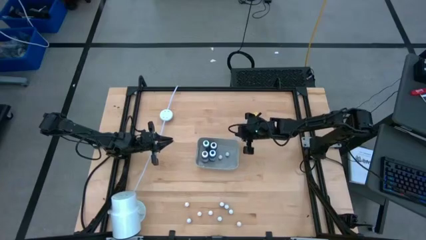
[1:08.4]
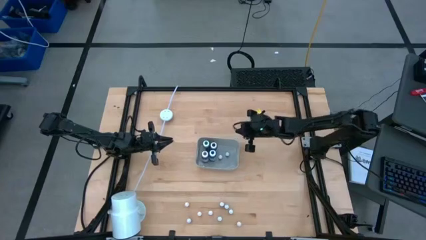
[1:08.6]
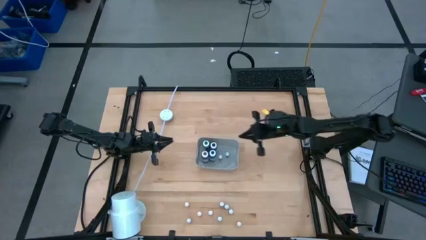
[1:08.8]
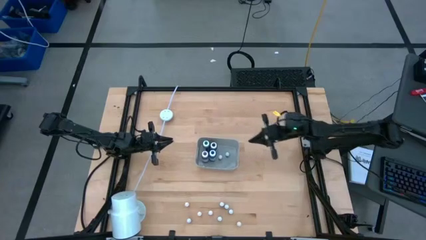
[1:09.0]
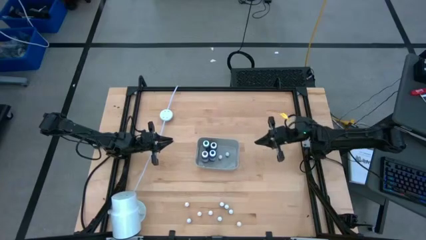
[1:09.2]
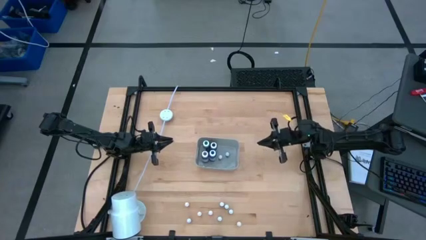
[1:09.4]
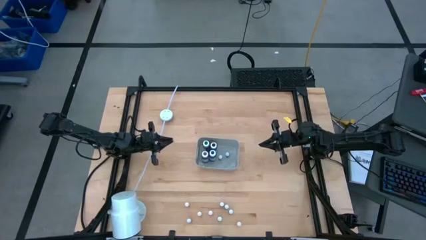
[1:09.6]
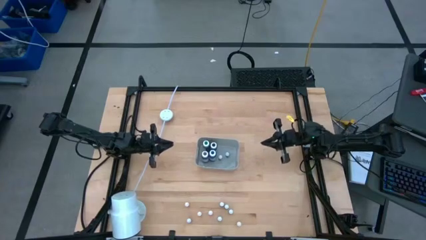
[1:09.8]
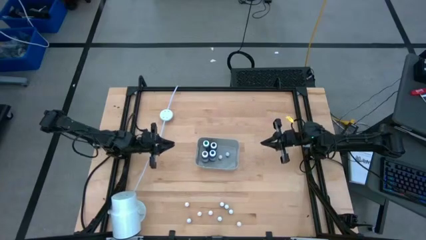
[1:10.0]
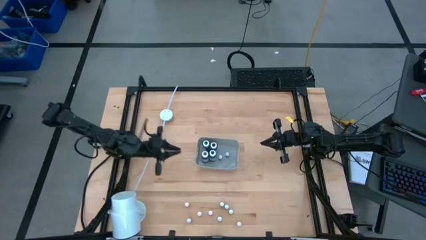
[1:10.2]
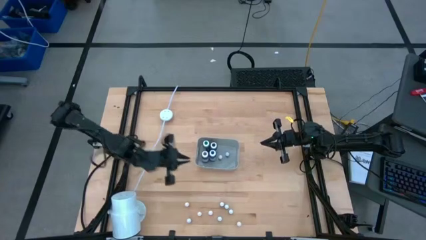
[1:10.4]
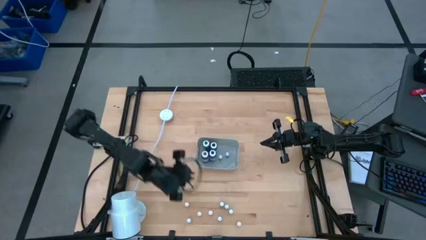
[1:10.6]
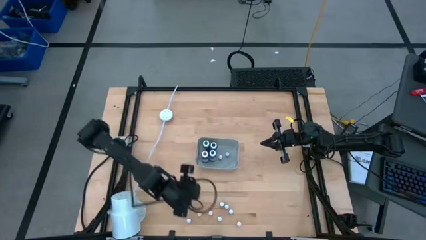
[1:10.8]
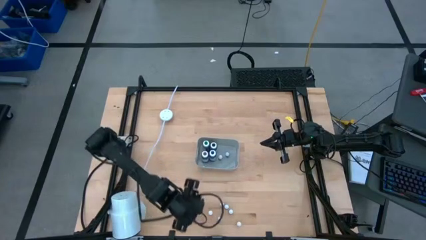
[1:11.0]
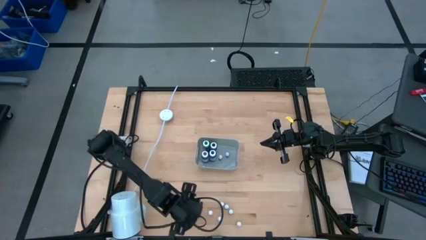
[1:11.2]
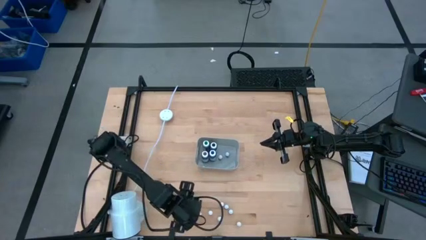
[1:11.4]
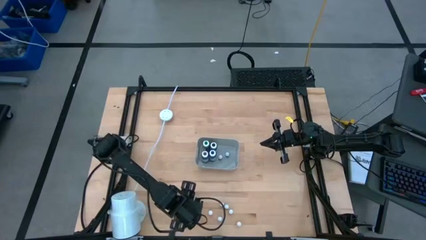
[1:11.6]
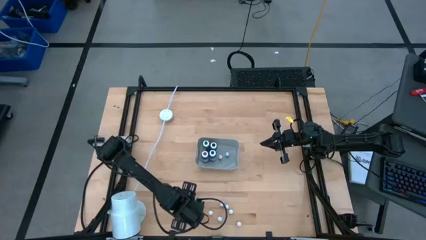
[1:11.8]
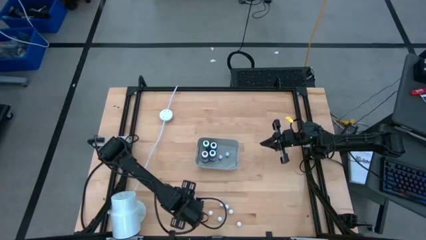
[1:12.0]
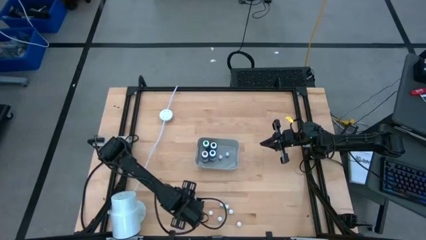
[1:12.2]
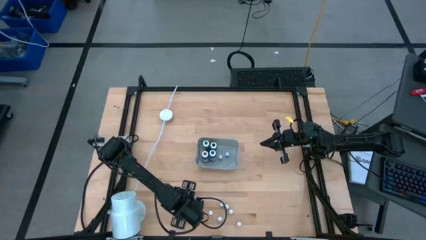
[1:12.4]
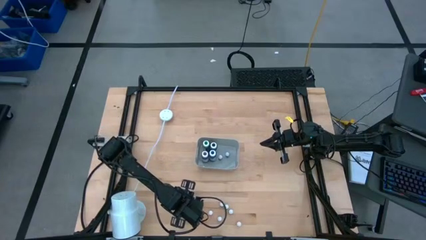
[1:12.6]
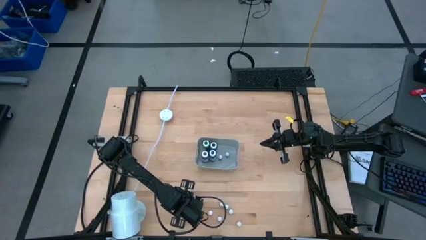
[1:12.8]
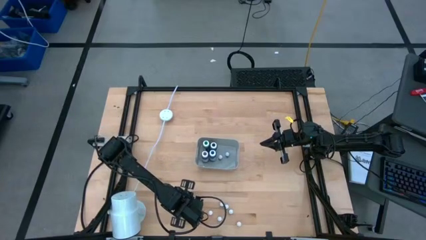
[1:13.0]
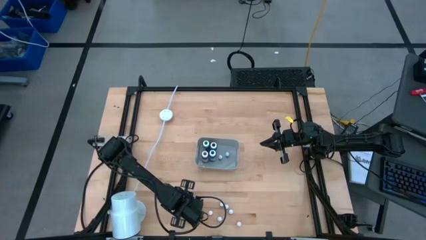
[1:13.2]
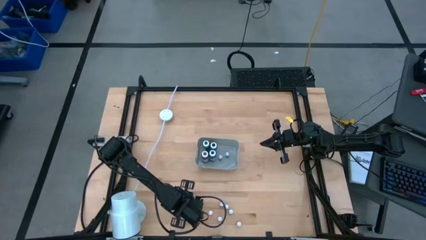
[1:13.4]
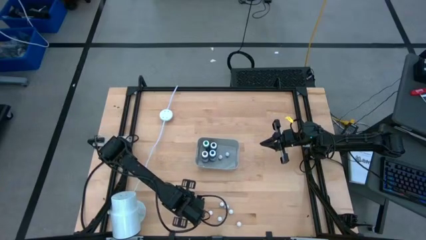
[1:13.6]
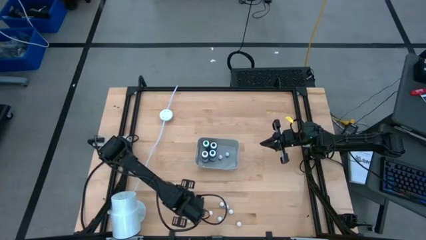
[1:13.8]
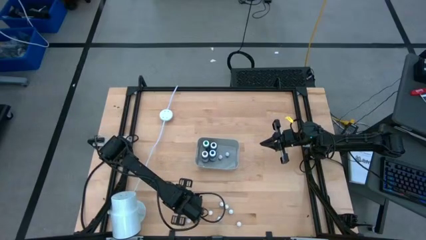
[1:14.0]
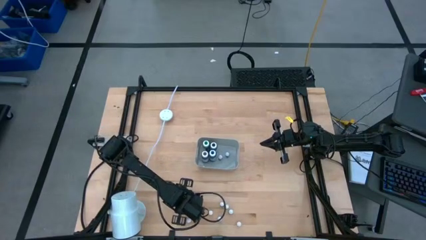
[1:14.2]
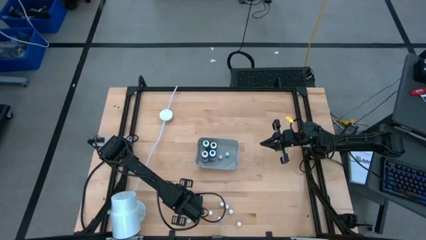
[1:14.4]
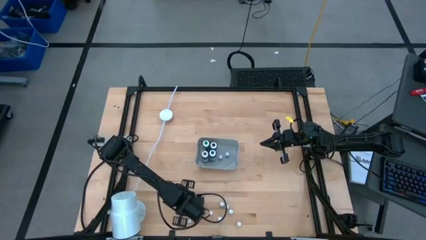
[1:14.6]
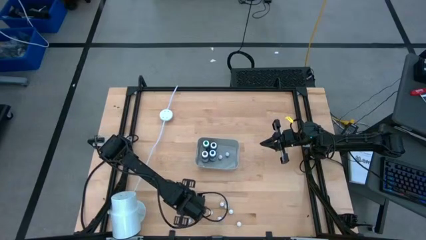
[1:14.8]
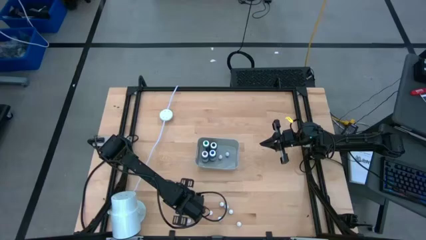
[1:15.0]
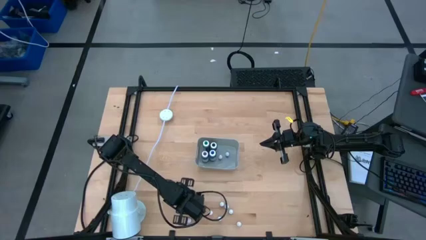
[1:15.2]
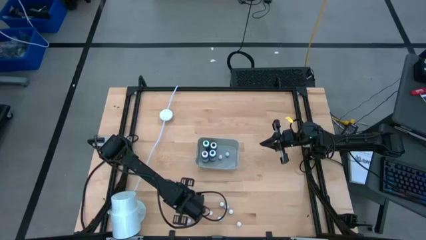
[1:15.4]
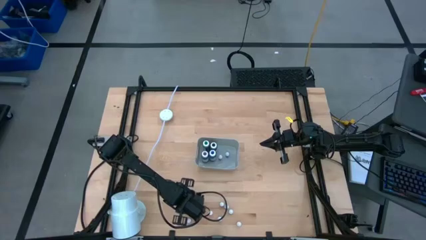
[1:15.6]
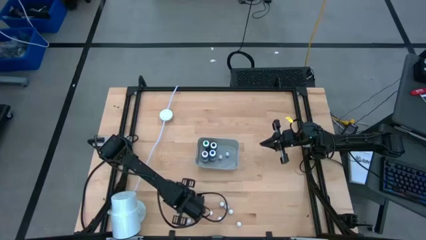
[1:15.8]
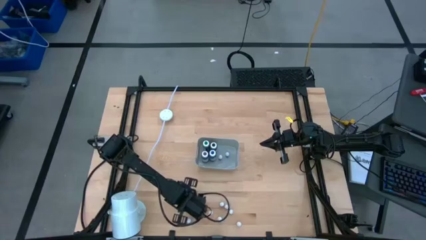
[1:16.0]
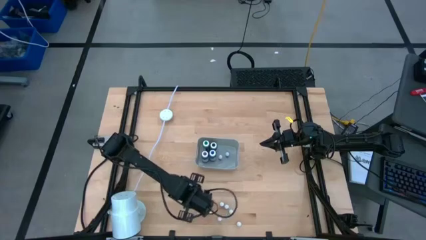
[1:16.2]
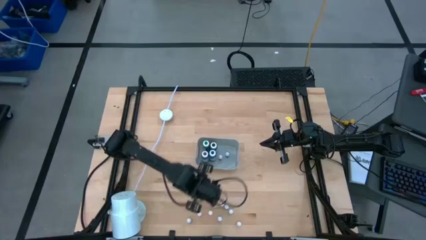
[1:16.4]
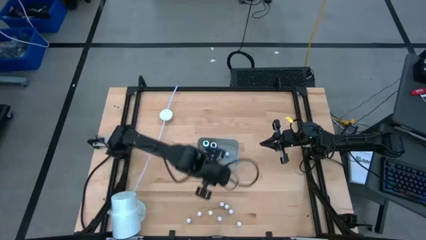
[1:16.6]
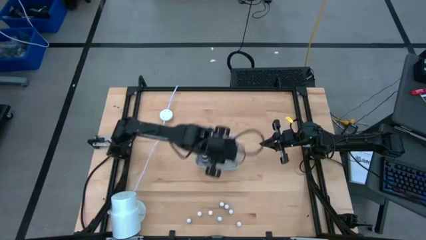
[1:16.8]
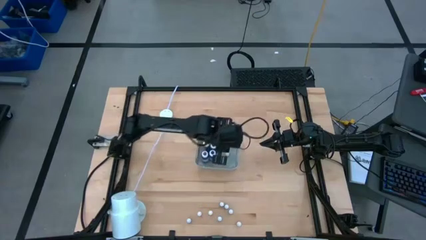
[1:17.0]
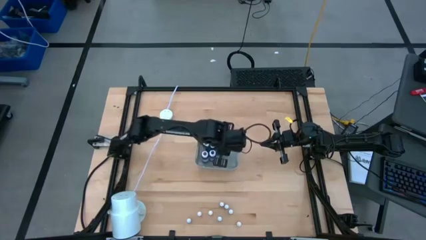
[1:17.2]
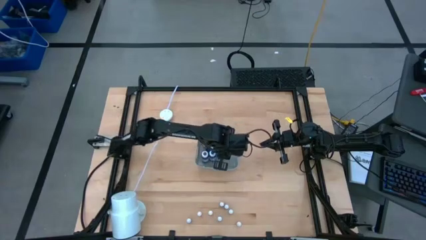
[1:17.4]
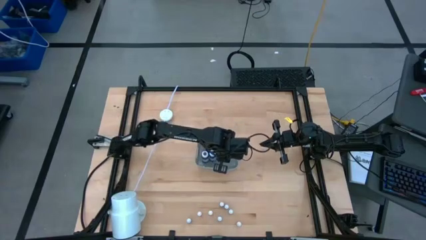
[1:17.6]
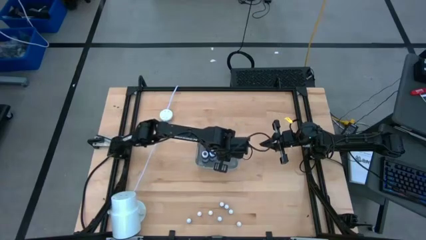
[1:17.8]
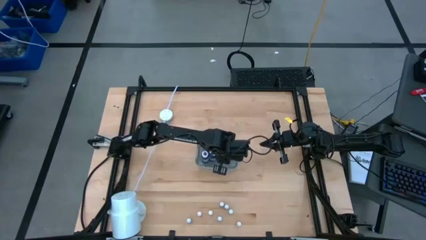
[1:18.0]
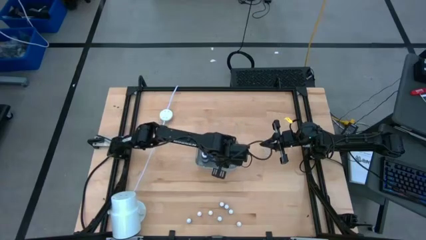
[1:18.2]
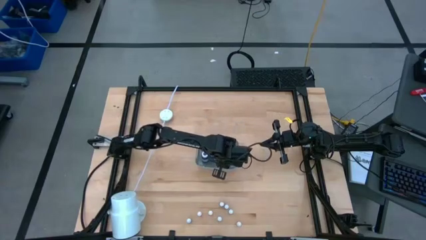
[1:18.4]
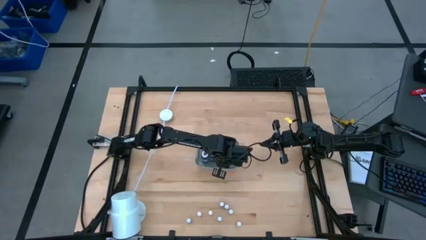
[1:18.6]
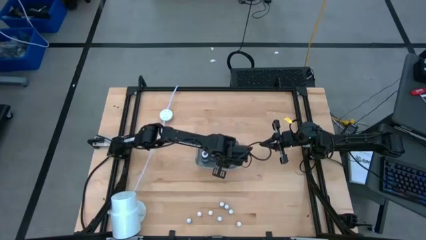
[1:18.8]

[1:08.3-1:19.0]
Task: Pick & Place food coloring
Put the small orange food coloring bottle into the gray container

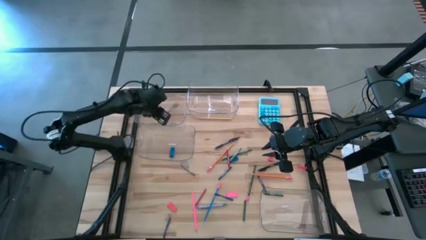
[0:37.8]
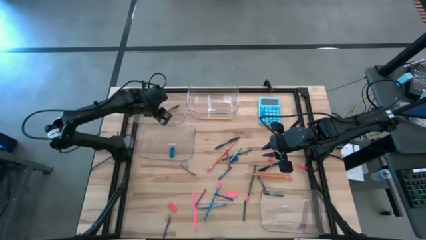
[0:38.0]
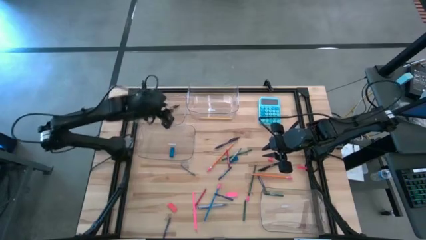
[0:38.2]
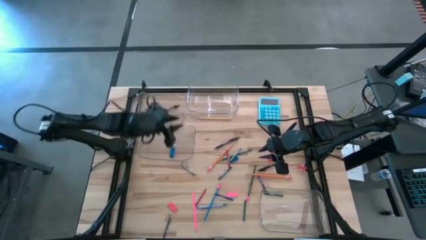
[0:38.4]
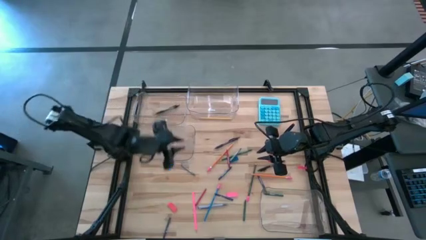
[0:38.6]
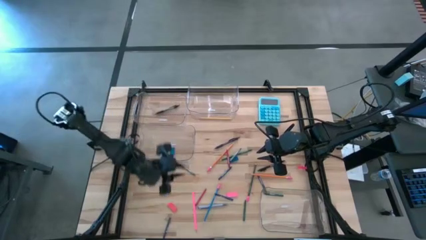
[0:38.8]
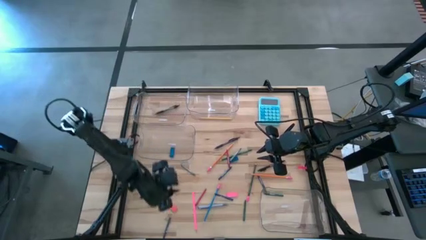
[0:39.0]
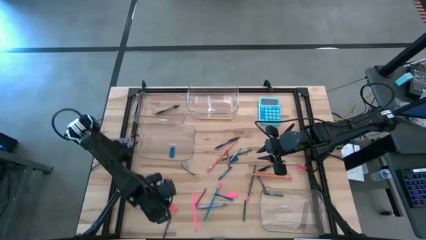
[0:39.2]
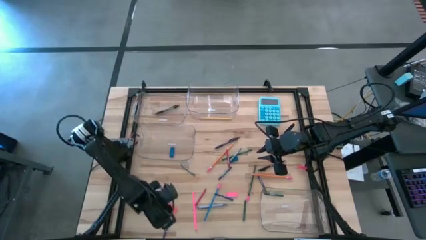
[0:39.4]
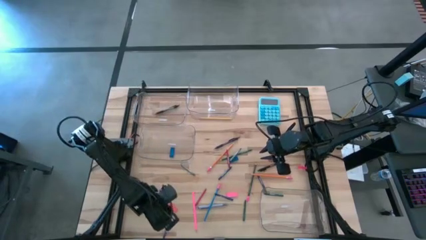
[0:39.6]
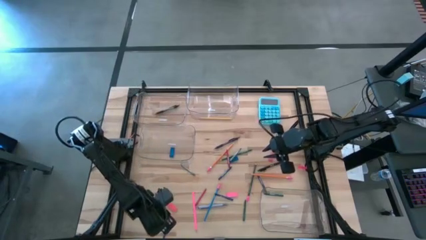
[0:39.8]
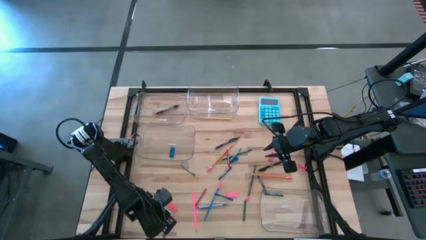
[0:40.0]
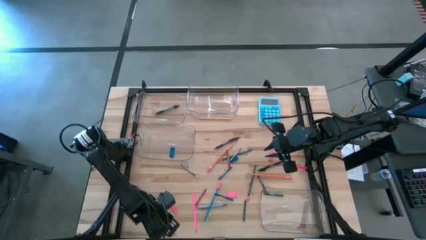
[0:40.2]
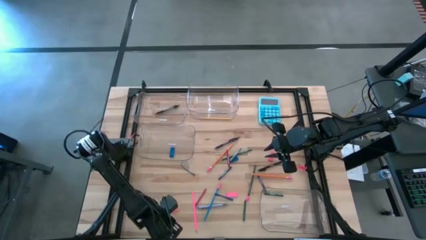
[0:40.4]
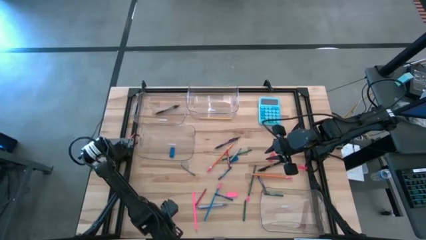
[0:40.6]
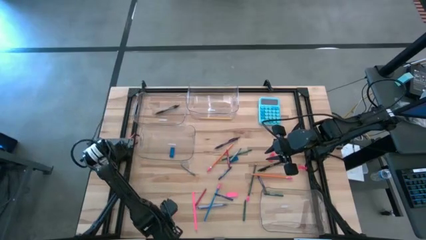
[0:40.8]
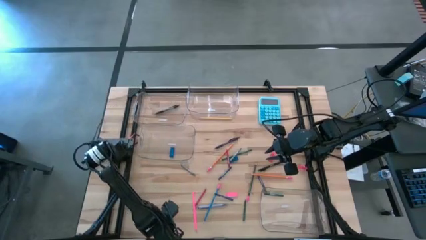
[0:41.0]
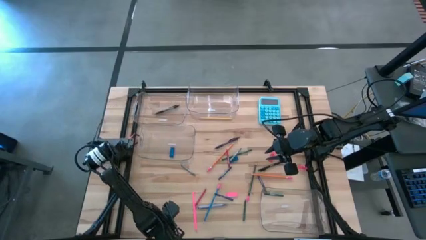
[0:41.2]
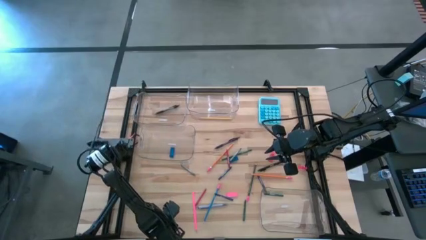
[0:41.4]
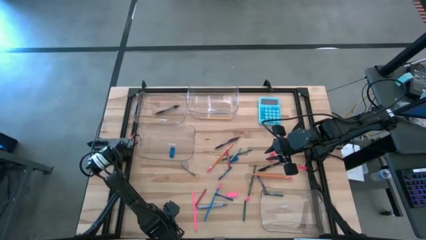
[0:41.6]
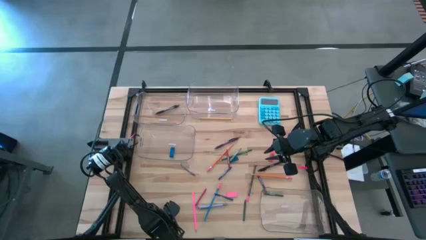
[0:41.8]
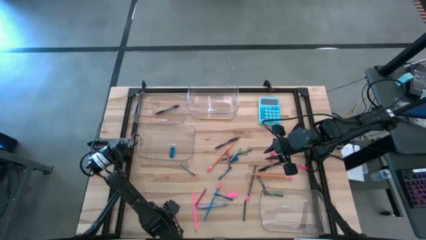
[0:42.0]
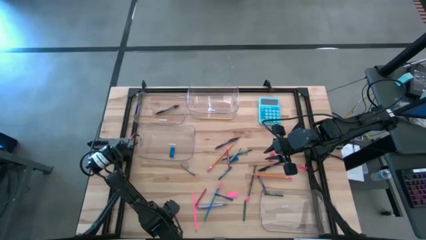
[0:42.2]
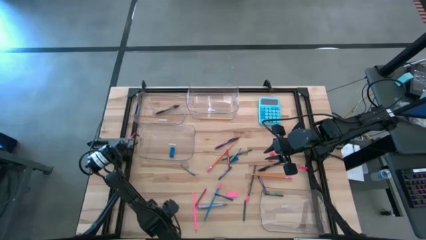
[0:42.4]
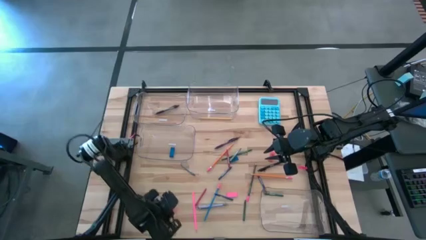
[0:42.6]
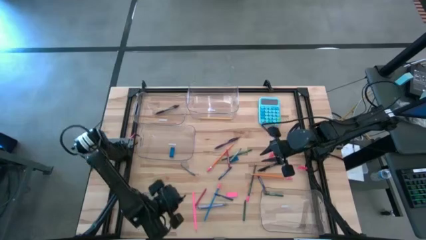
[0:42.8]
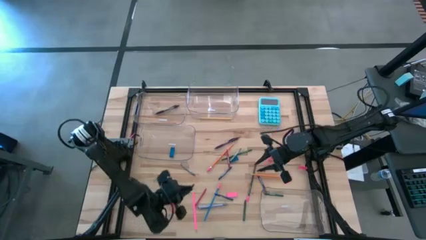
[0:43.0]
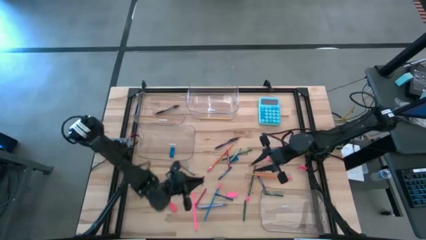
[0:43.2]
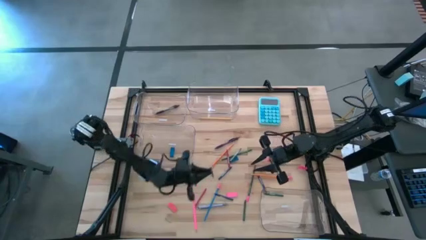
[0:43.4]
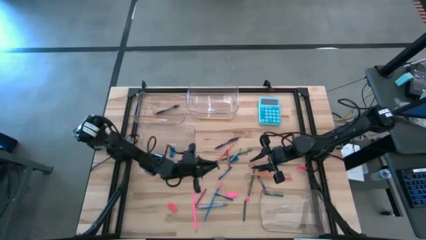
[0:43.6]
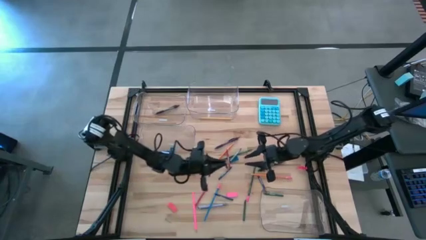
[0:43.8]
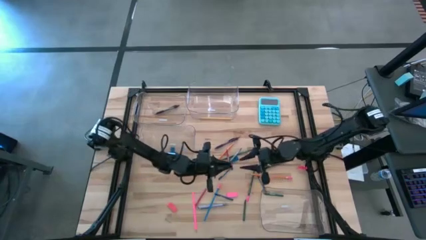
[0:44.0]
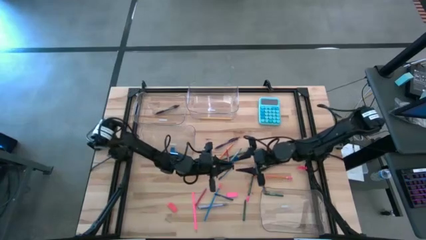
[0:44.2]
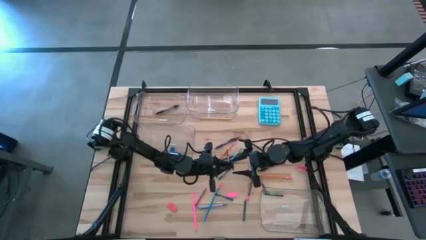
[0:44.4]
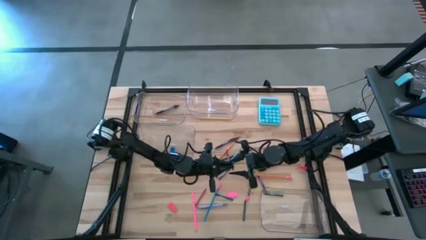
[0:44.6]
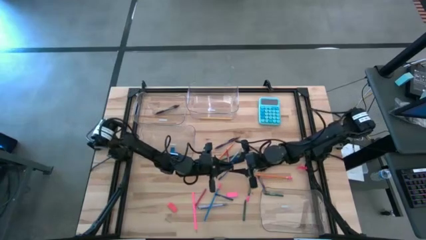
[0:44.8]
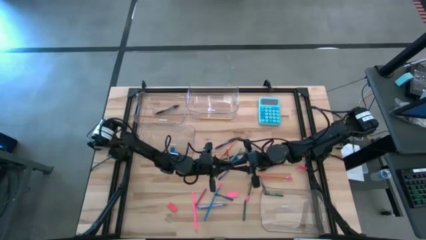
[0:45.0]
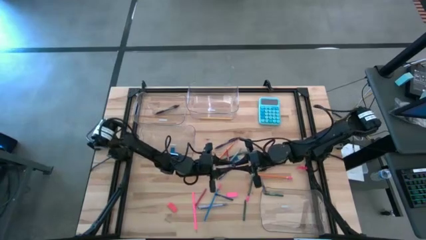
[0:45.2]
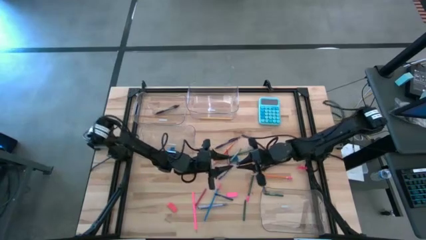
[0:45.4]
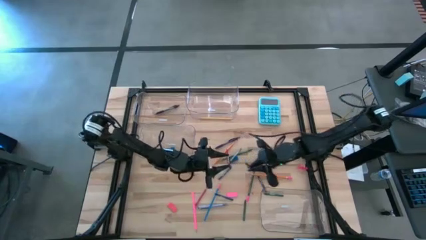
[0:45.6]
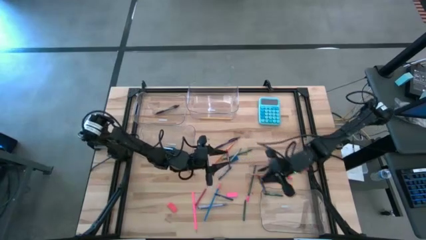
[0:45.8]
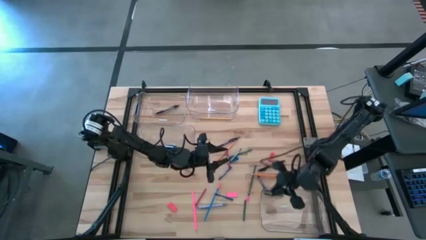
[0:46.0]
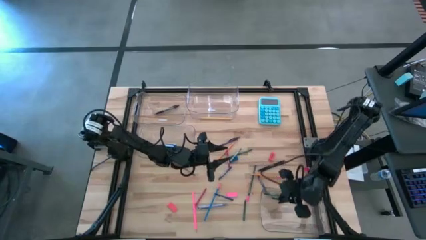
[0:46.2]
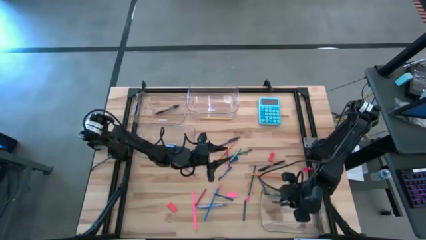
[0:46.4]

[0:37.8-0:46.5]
Task: Sort crayons/erasers/pens/pencils in bins
Put the blue crayon into the bottom right transparent bin
